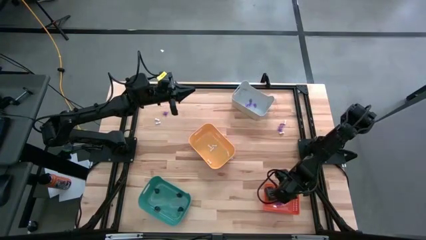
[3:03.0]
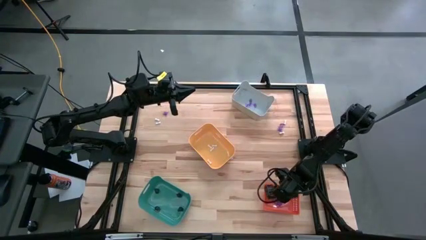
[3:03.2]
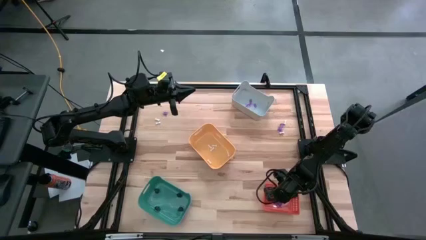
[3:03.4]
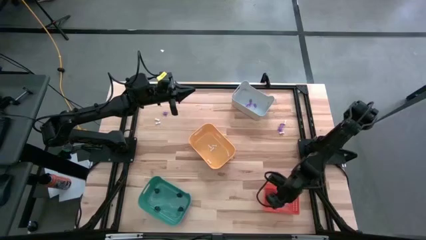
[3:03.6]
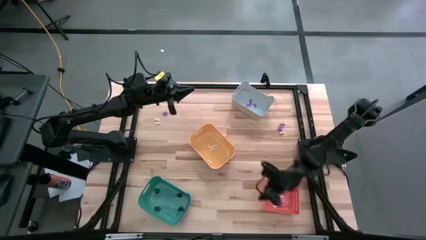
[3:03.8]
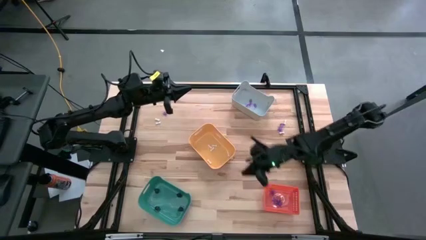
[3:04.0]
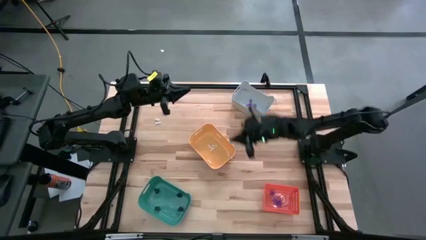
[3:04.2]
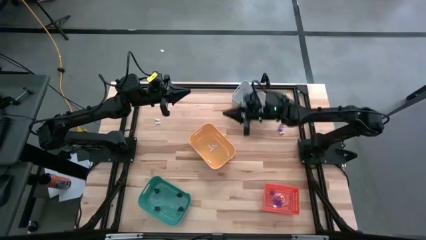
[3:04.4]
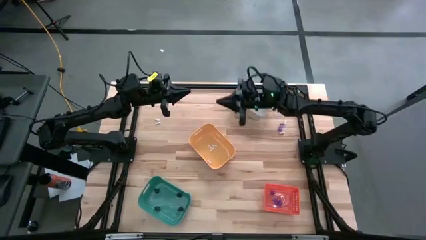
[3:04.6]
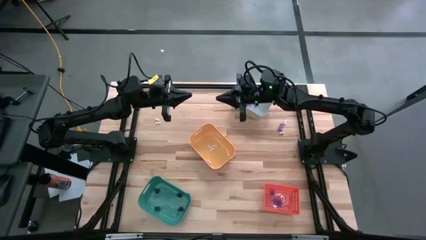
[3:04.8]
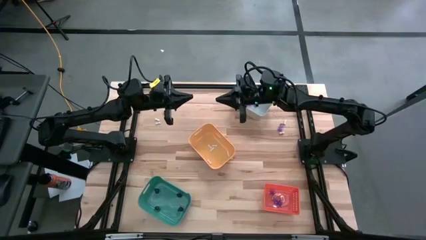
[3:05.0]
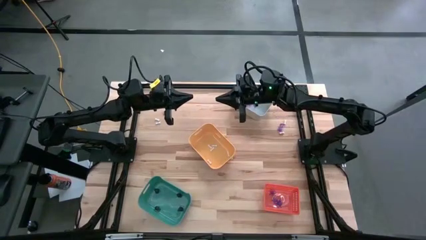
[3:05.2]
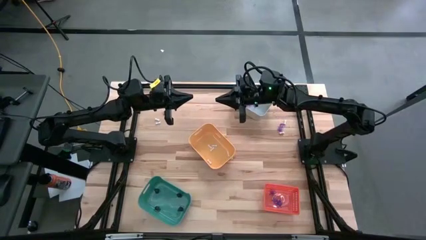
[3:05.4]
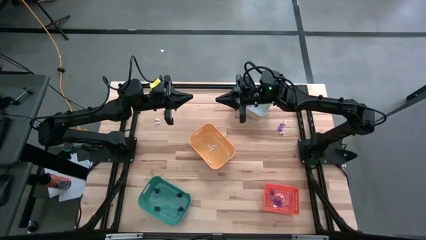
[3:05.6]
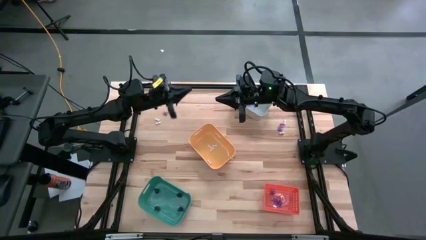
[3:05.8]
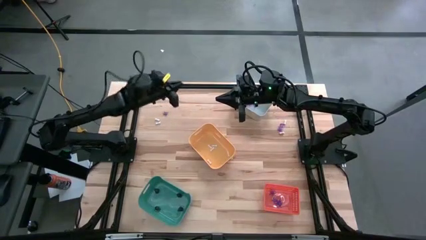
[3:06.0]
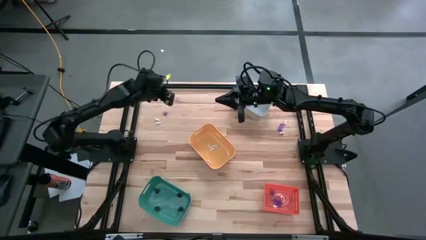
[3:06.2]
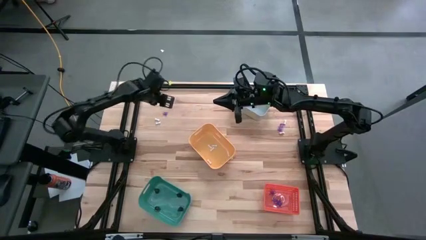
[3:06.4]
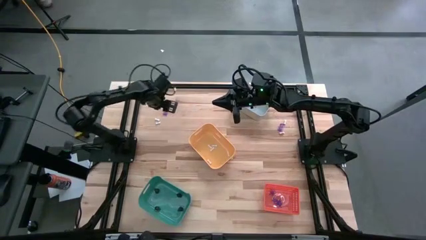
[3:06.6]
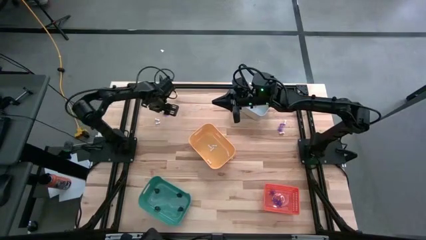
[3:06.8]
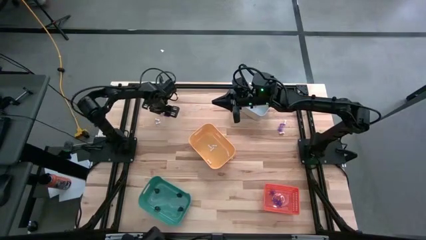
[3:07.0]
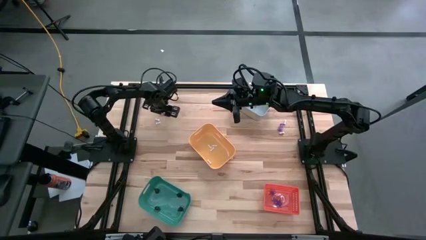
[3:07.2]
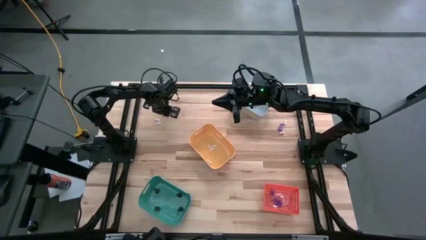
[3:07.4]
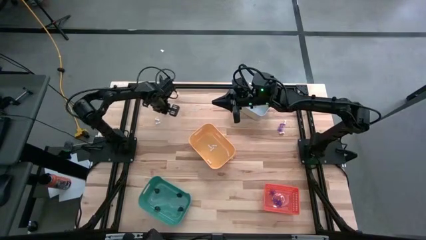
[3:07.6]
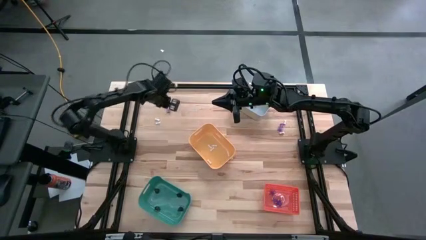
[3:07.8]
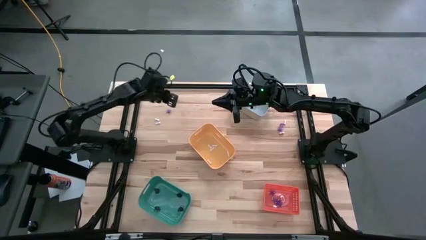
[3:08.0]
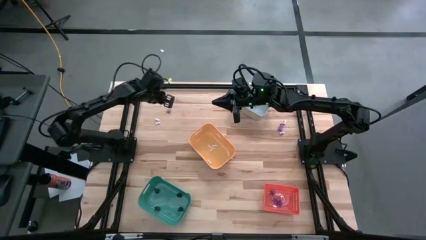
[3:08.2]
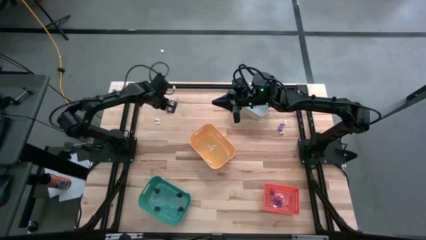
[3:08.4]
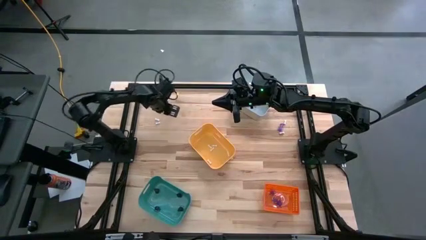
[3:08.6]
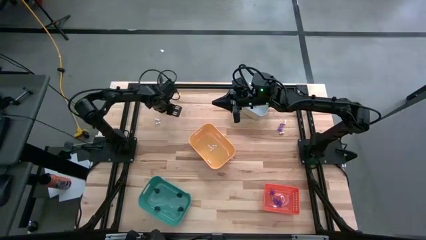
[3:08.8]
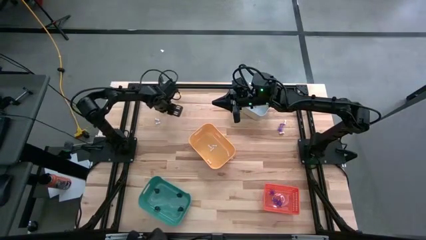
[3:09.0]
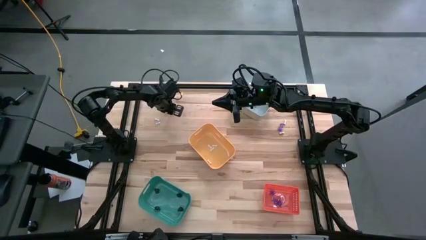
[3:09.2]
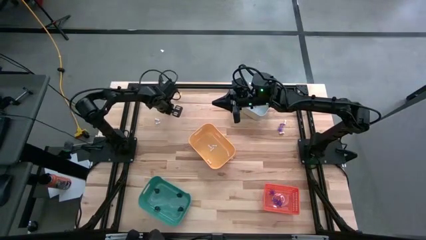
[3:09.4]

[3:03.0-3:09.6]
Task: Sort Halloween decoration
Put the purple spider toy into the orange bin

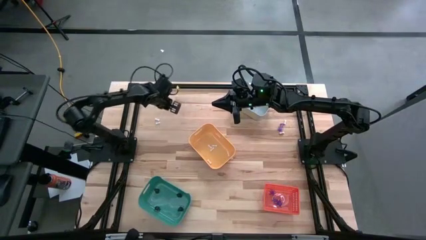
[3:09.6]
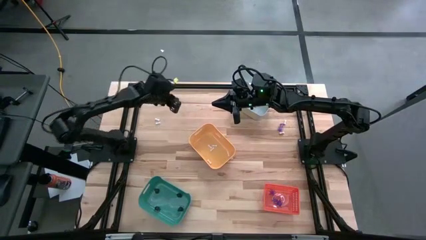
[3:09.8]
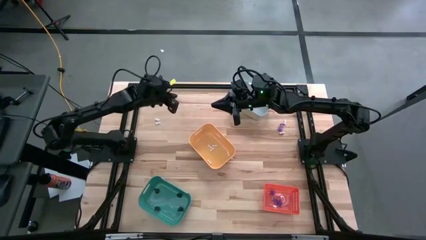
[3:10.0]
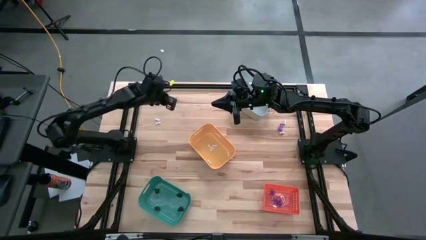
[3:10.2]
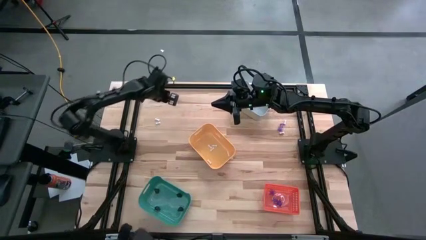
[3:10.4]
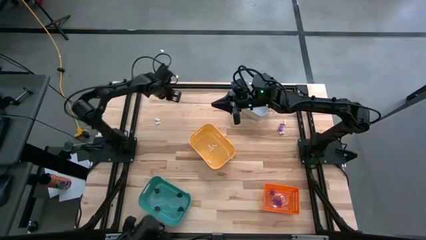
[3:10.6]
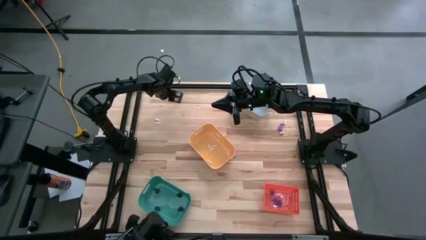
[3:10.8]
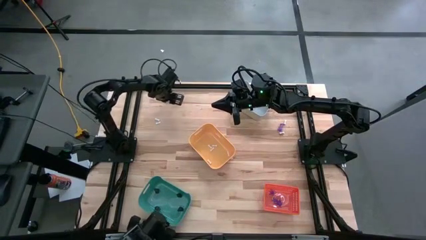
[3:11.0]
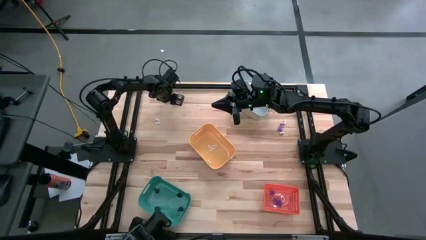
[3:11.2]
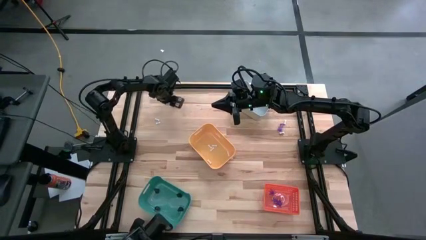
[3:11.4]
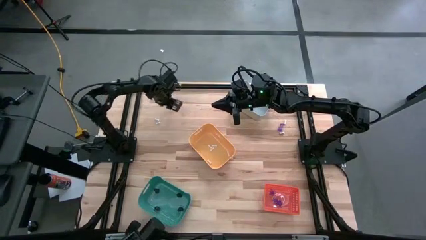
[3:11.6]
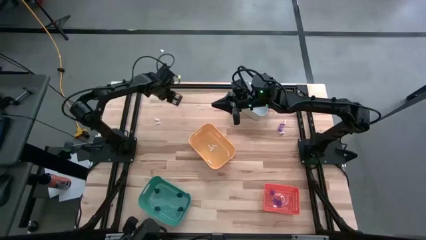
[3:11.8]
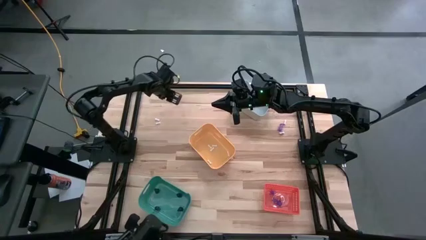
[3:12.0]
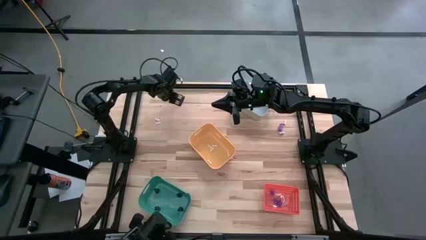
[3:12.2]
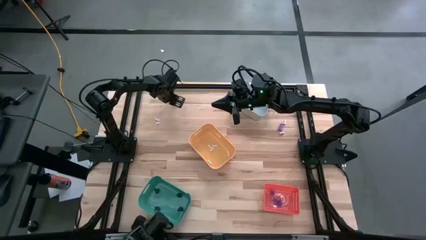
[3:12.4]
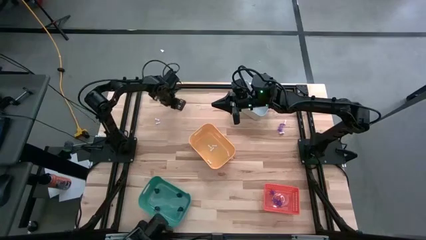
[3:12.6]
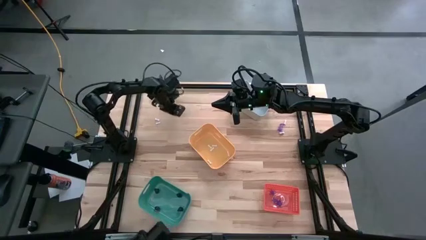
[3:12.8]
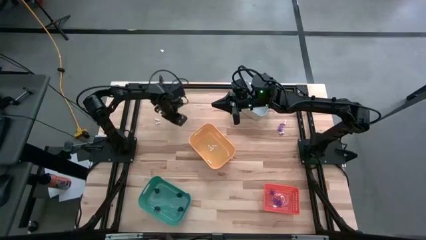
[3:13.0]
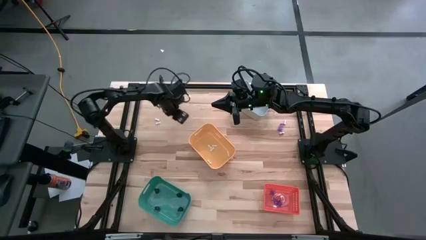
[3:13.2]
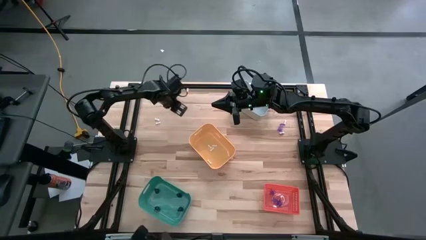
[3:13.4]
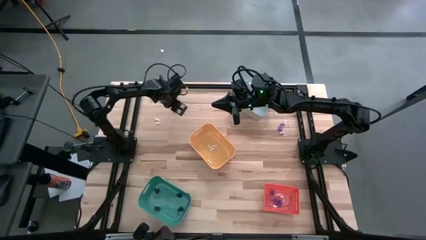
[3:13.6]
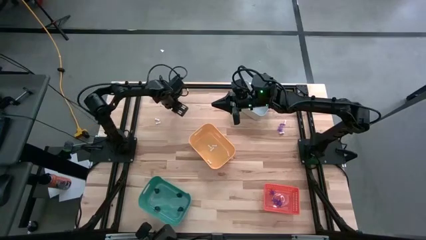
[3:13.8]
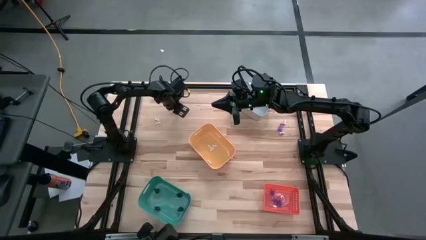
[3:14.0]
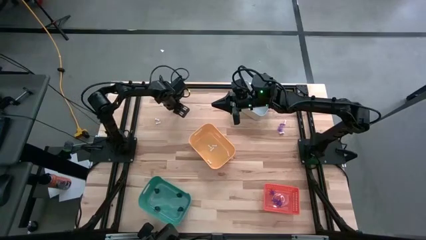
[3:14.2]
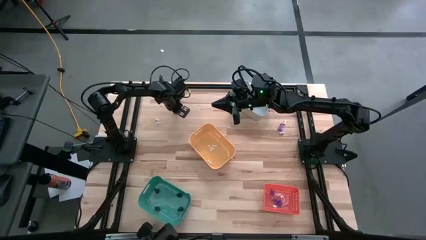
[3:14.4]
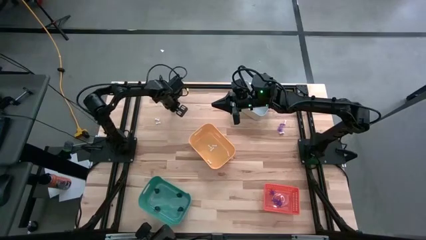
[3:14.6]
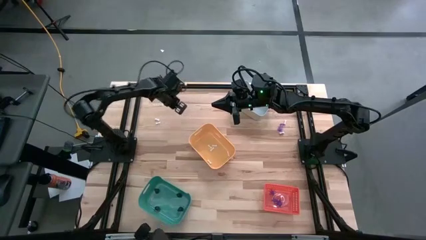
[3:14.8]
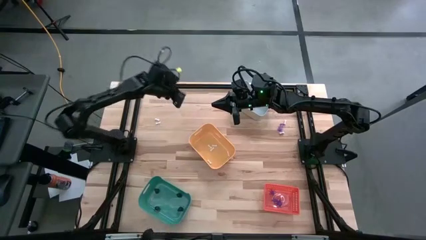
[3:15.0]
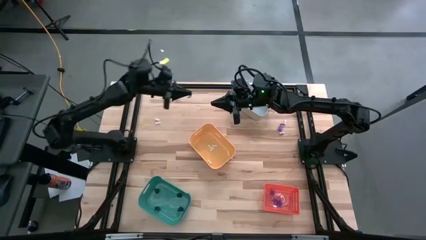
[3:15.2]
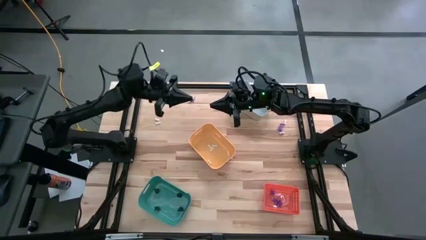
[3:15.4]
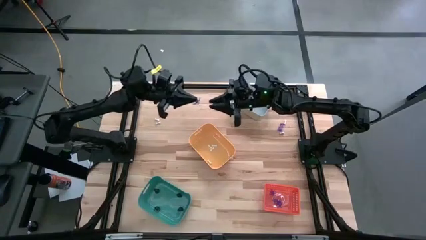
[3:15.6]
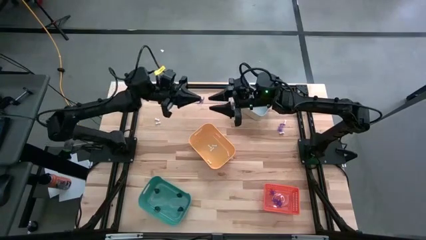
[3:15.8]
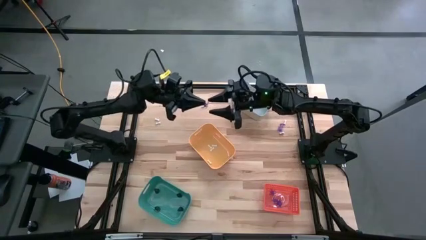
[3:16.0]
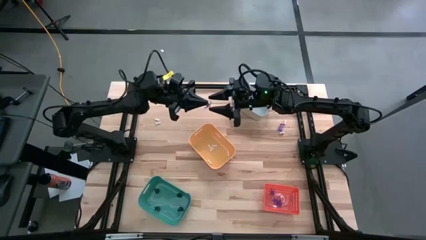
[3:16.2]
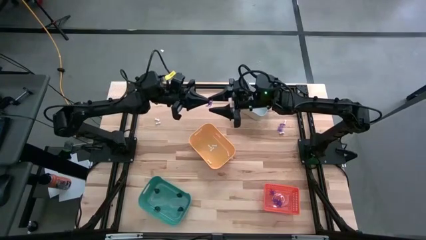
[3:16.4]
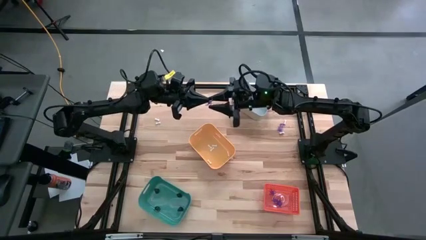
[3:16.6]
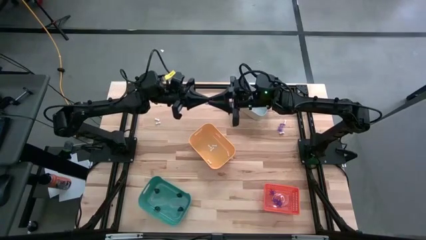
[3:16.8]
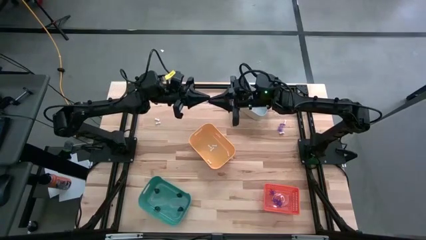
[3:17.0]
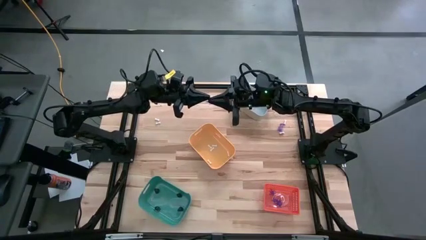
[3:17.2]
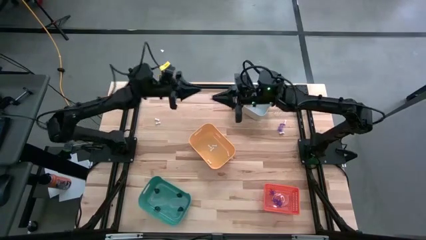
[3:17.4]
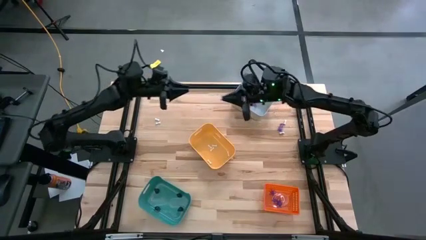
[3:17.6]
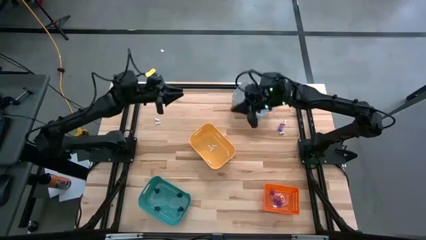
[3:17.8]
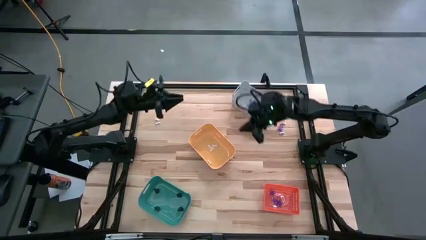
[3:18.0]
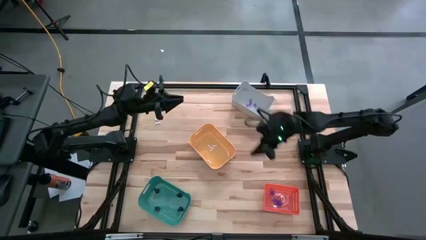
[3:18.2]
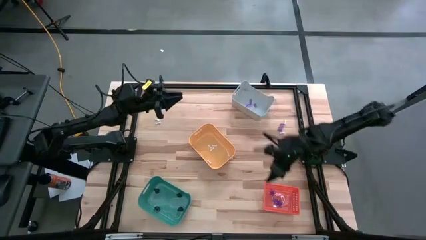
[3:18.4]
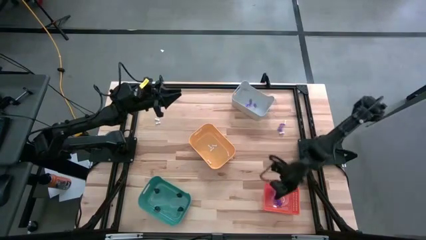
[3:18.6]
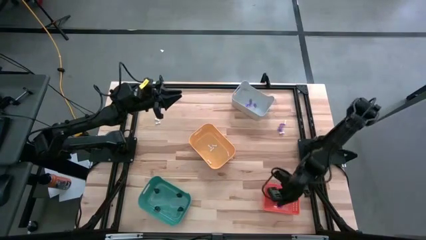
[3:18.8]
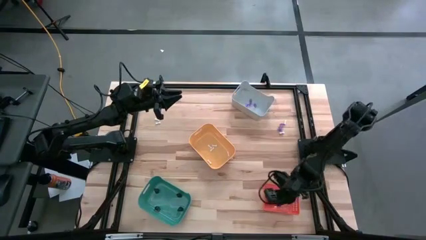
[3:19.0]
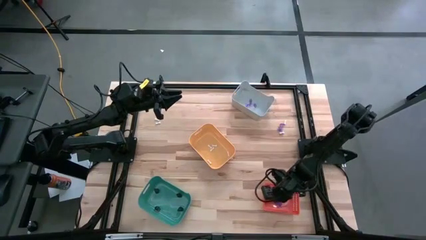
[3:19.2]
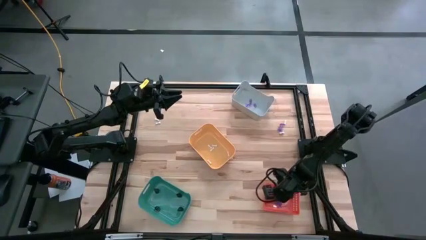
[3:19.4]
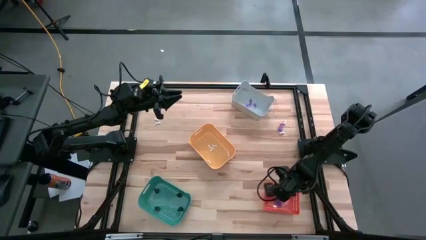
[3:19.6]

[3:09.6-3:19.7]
Put the purple spider toy into the orange bin
